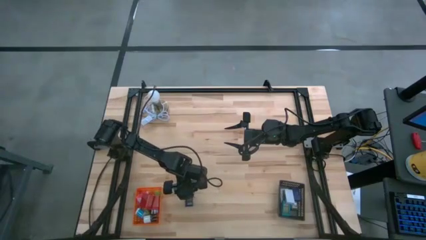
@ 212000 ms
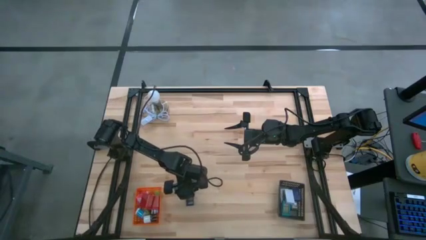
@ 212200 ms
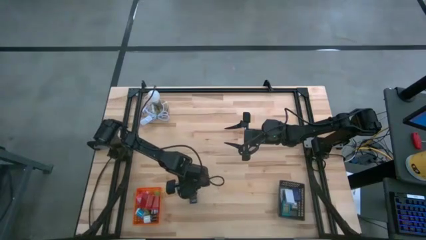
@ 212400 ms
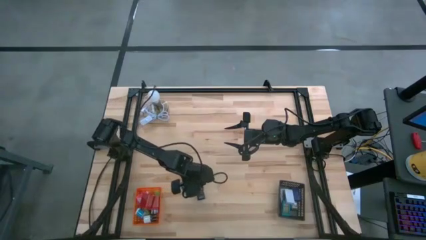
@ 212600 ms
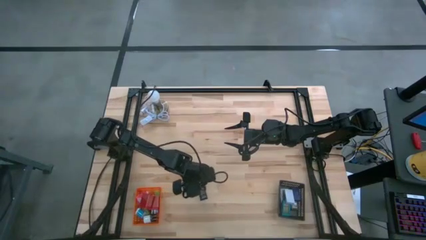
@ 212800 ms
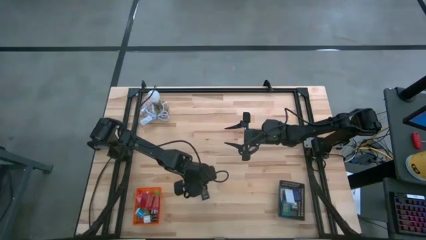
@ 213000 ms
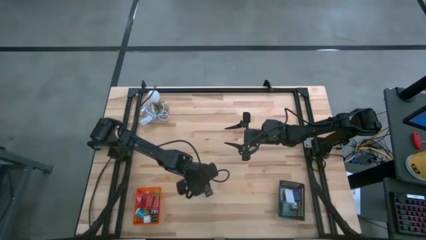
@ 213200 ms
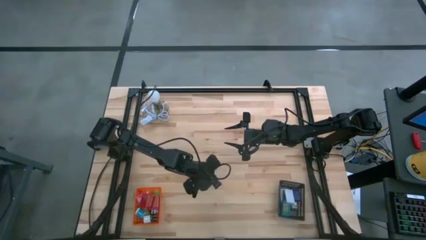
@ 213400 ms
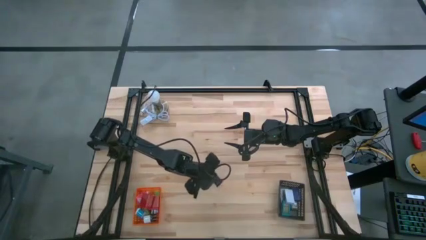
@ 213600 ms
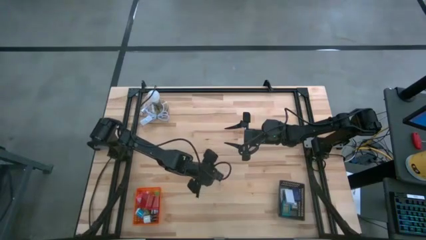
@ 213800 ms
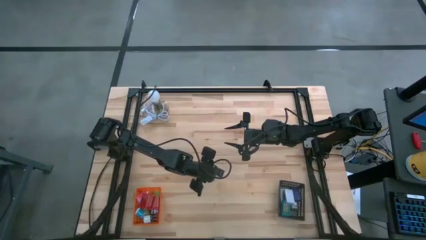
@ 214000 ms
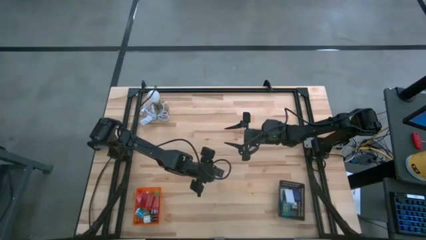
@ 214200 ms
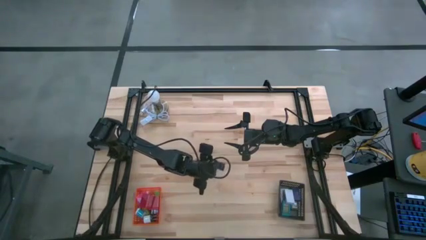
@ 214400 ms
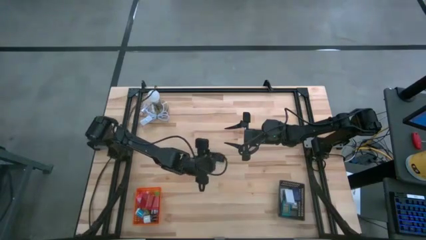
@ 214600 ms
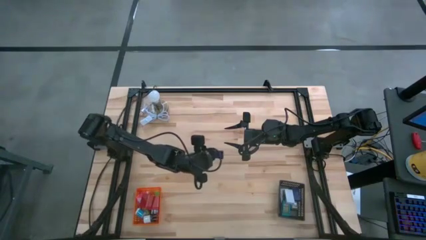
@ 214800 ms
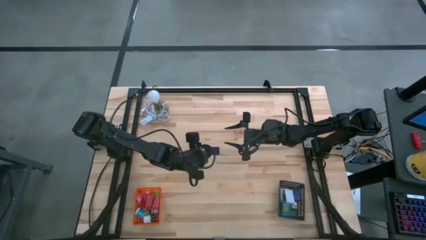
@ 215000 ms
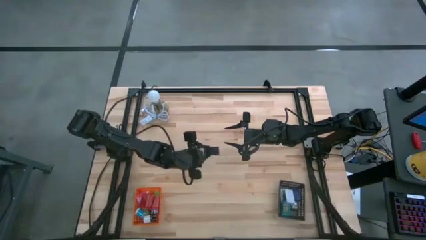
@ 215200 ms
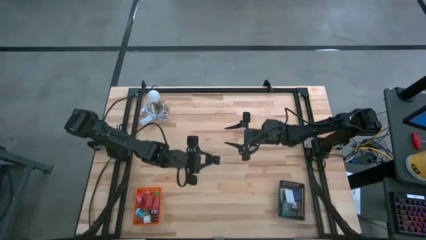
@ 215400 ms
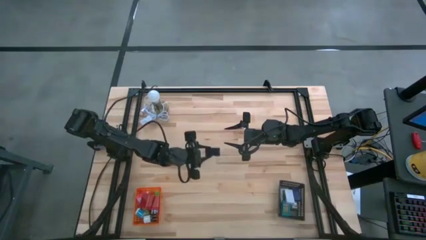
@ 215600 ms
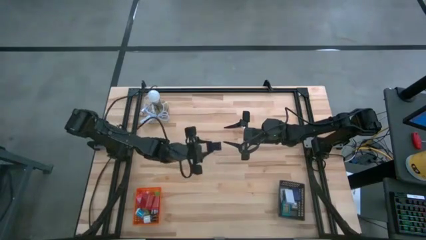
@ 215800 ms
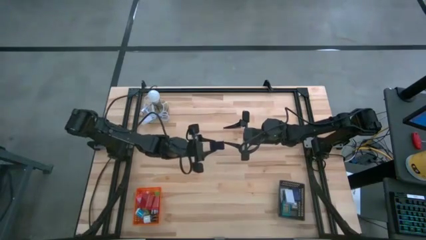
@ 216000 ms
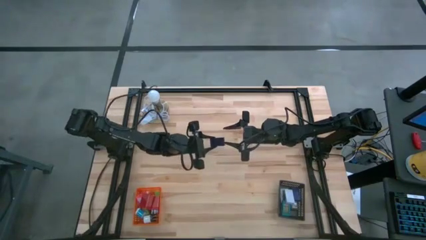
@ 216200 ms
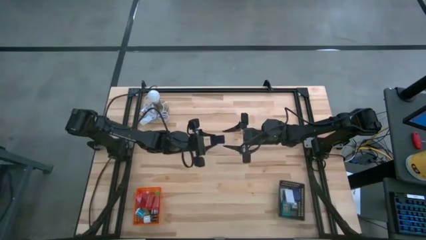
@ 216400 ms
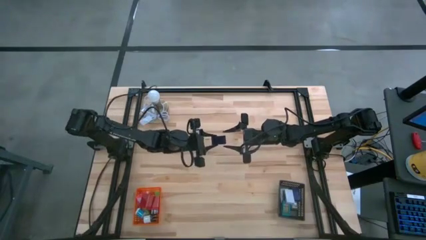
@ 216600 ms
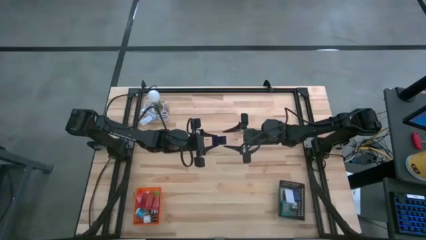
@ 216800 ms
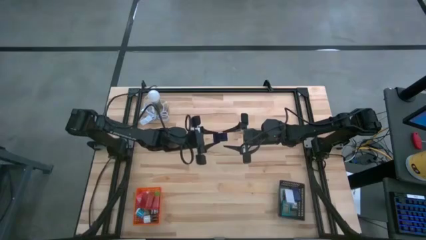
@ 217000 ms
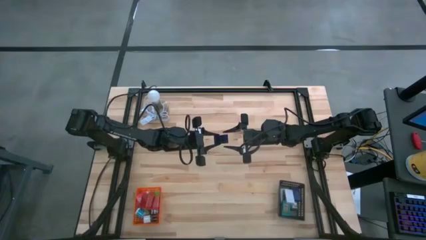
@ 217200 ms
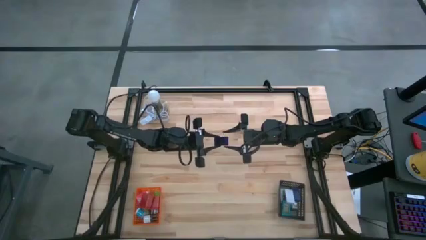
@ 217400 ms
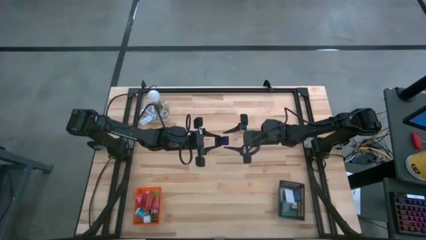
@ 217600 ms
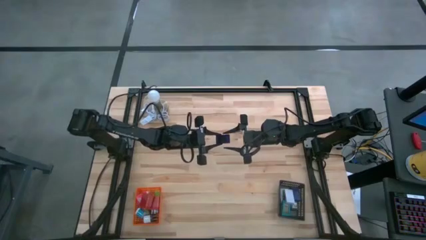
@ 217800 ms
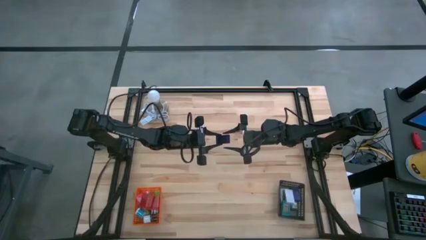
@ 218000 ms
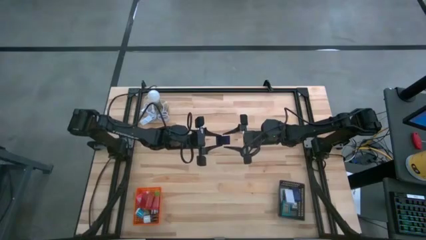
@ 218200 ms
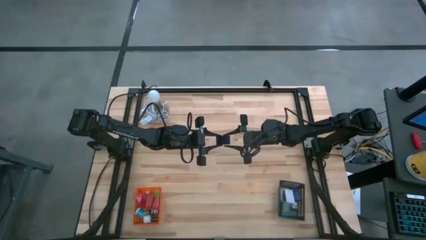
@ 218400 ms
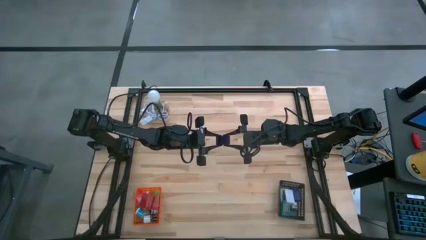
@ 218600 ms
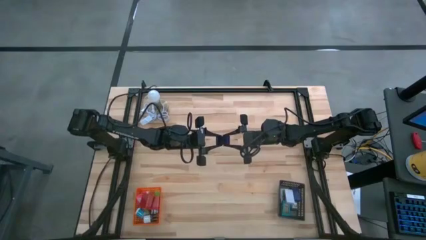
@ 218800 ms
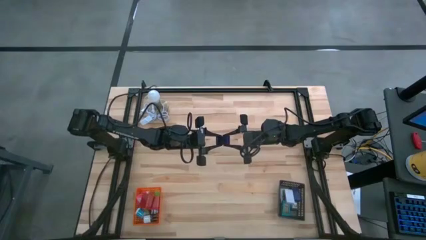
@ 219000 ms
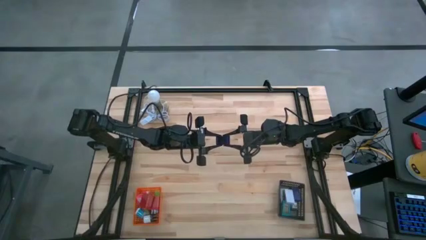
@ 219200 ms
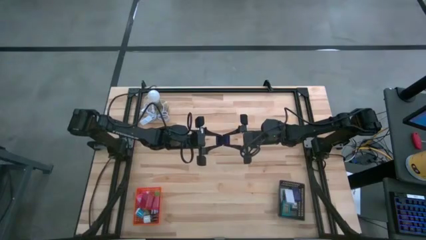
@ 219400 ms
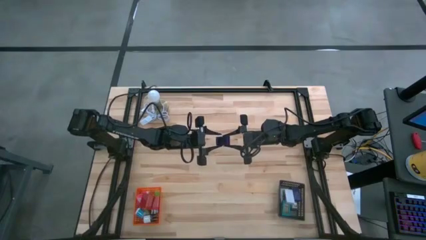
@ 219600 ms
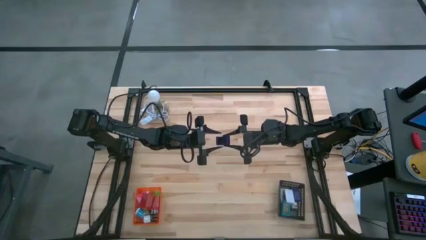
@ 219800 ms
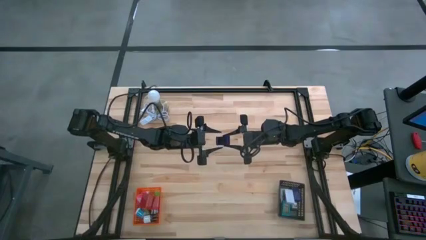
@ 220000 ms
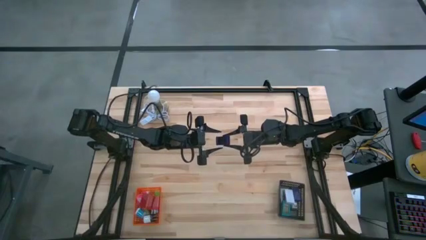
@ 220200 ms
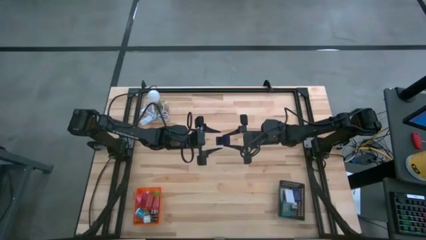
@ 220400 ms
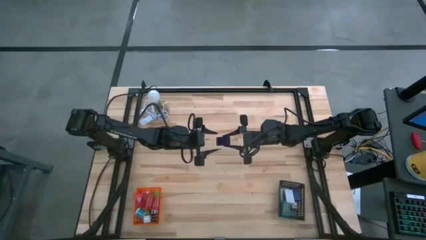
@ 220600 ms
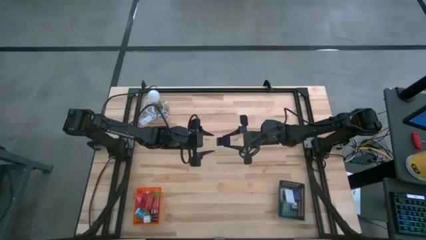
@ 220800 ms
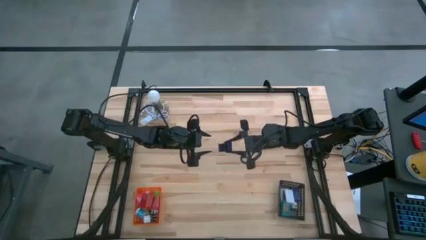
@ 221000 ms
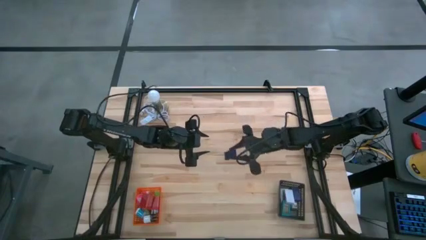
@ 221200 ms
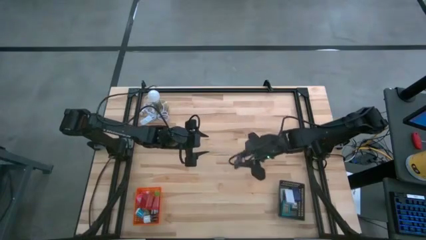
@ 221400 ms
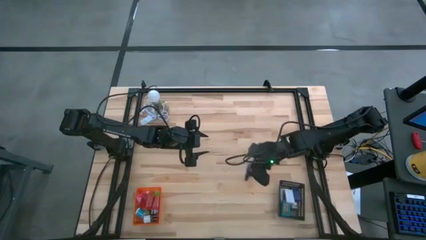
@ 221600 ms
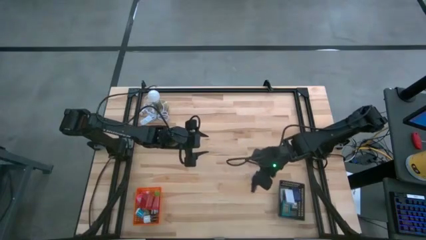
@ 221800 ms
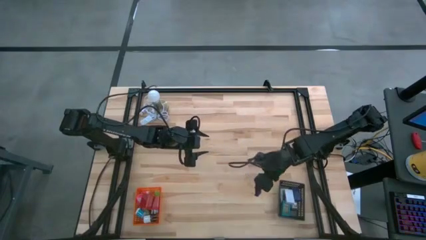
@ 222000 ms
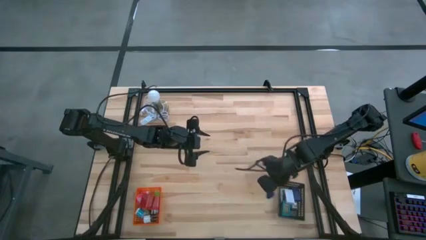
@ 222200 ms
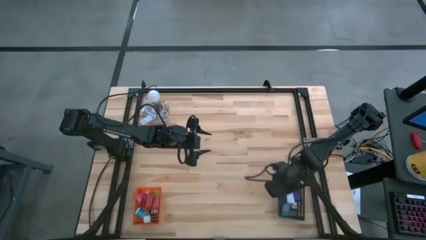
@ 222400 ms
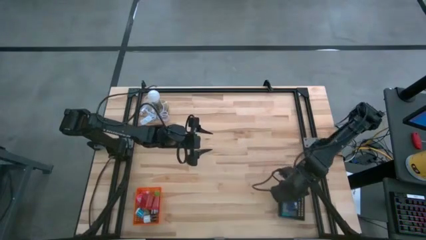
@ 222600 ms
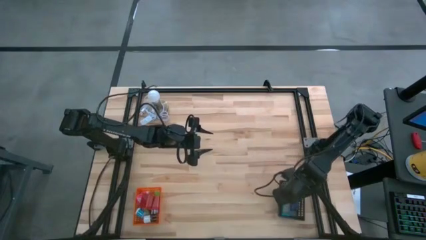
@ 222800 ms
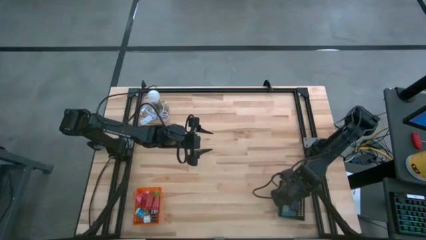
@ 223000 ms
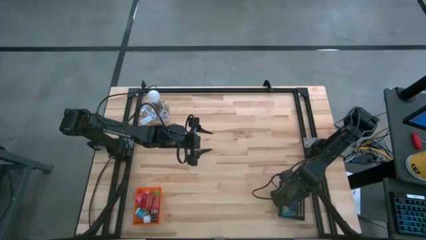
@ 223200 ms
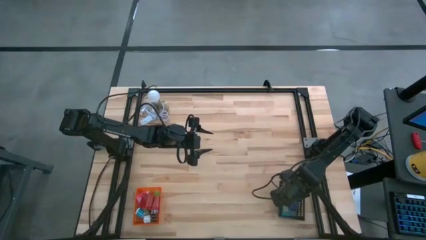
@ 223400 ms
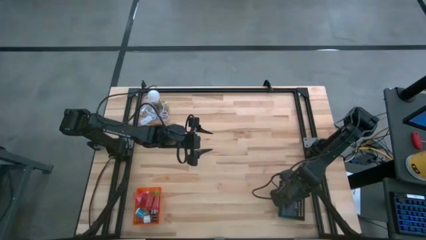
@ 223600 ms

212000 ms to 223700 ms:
Task: Pick & Place Office items
Put the blue digital clock into the black bin

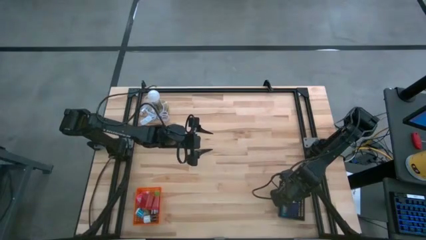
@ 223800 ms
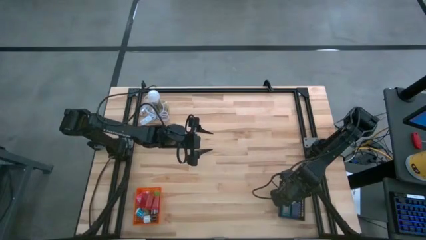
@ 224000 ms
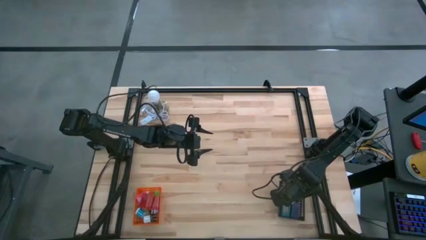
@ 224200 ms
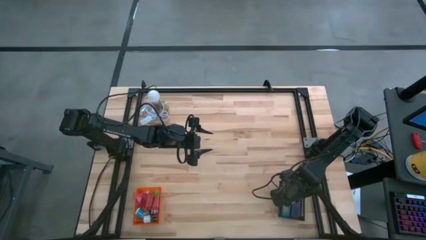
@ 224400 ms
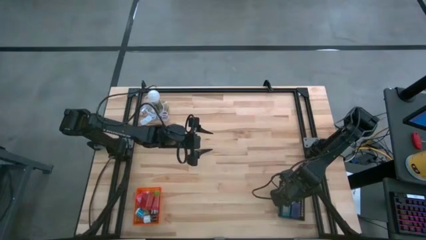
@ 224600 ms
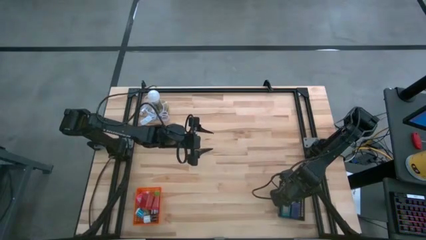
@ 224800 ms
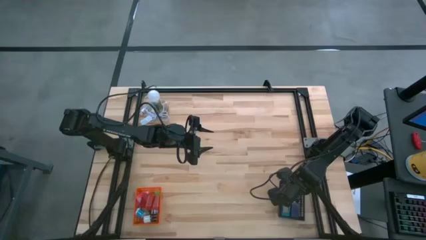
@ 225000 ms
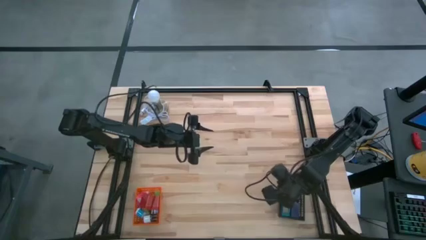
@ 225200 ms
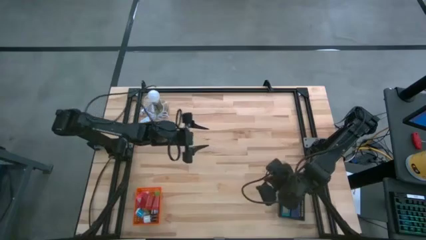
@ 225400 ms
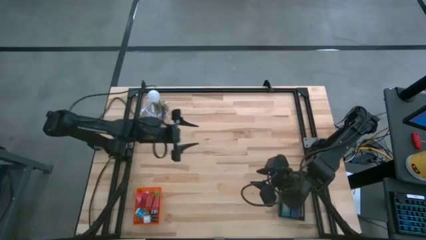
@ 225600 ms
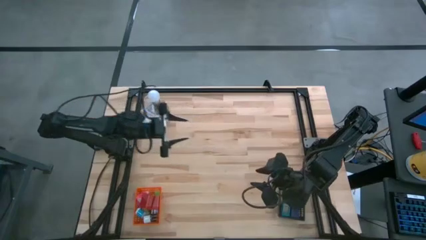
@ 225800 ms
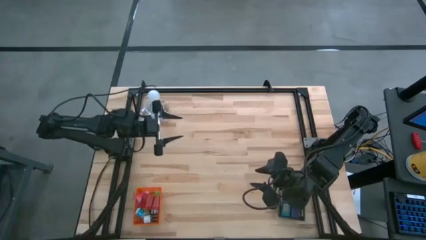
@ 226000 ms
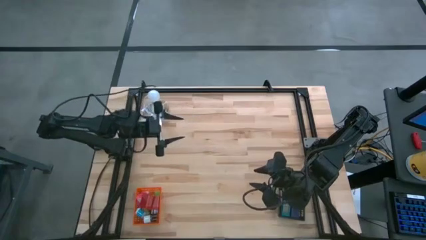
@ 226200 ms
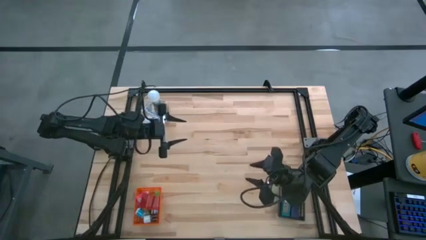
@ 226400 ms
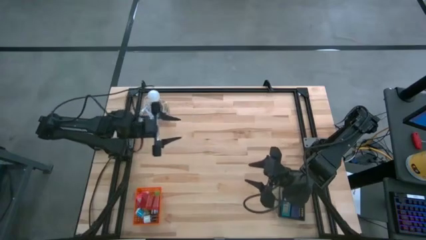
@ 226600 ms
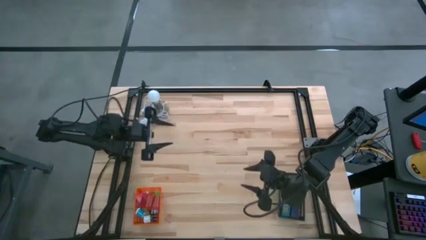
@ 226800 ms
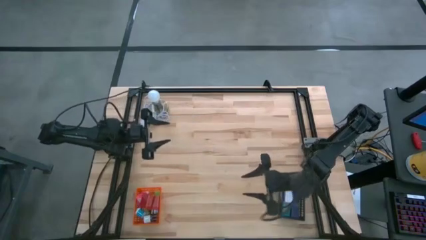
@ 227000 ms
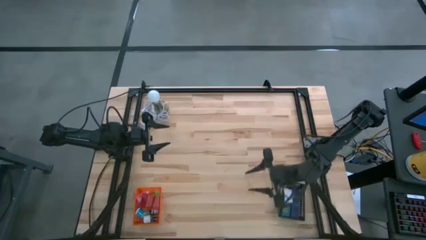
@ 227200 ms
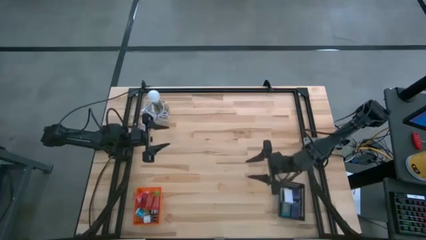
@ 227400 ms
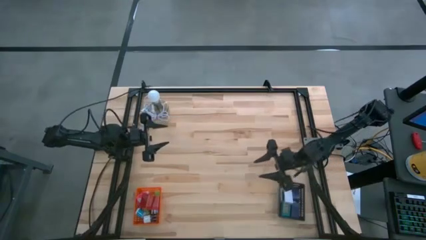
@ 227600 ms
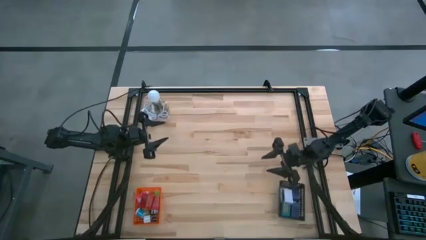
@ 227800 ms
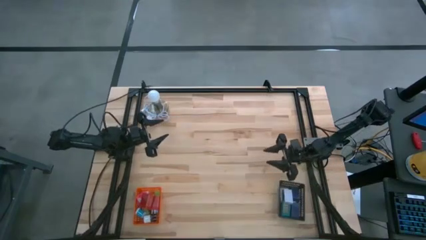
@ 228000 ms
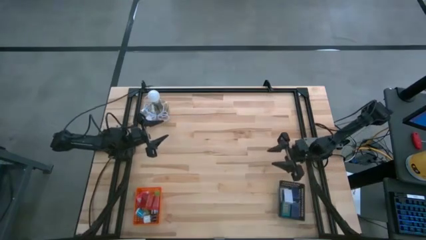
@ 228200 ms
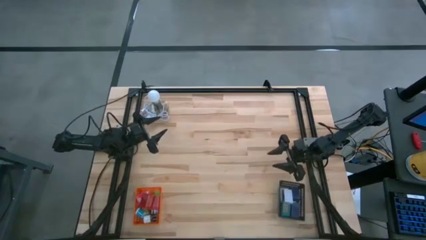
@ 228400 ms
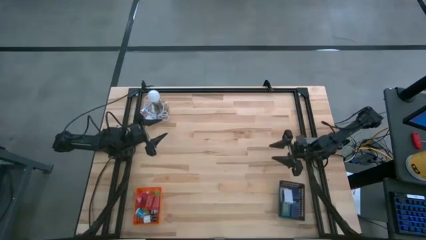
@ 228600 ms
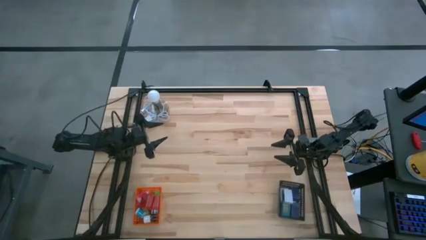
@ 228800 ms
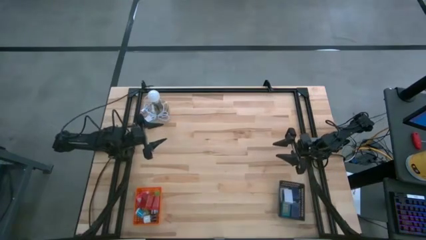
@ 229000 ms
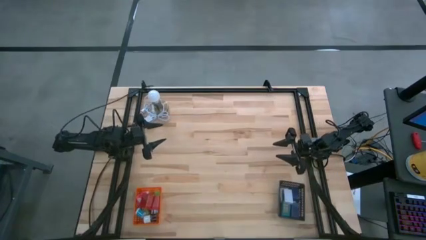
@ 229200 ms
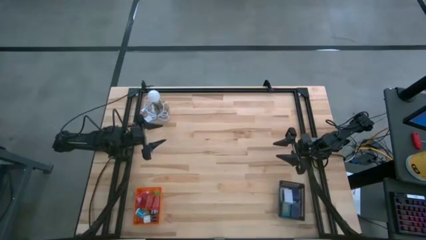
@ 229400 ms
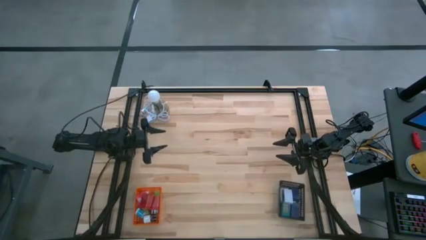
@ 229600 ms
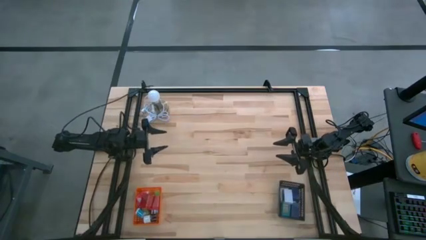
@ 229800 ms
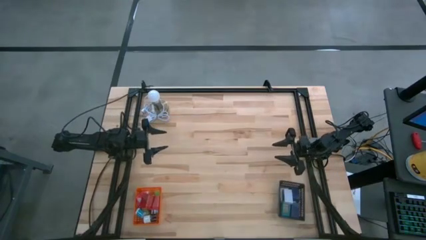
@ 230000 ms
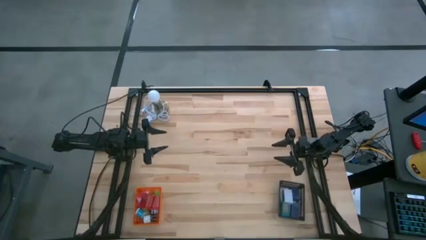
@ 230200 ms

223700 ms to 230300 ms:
Return to home position
